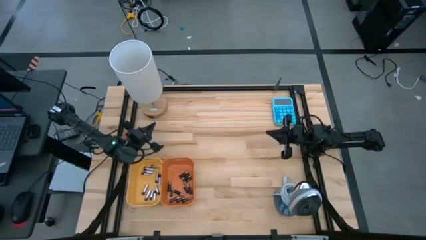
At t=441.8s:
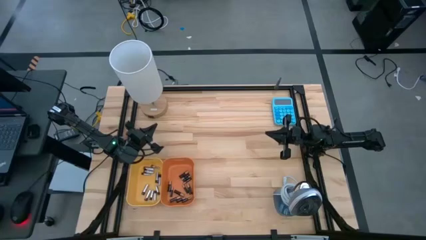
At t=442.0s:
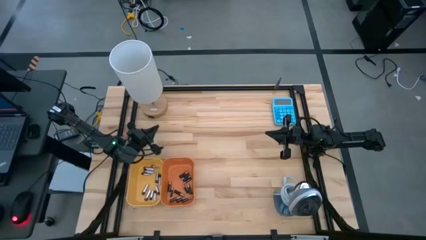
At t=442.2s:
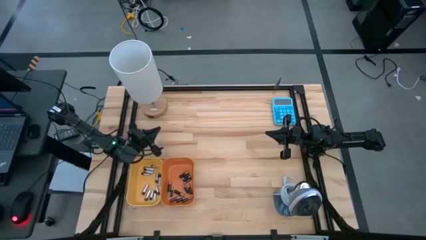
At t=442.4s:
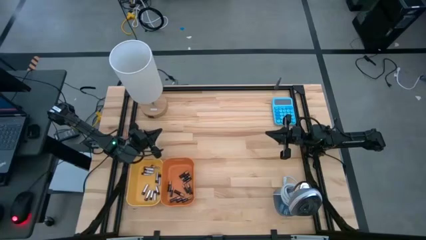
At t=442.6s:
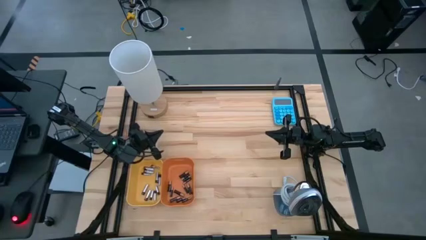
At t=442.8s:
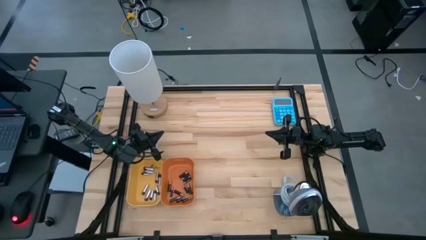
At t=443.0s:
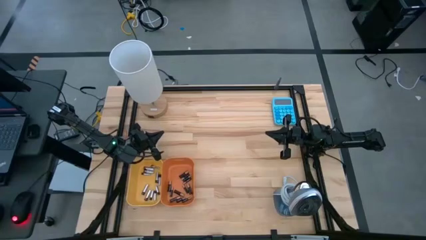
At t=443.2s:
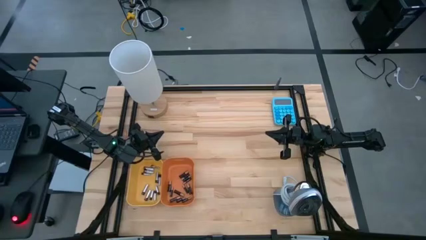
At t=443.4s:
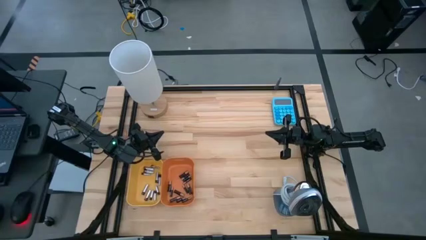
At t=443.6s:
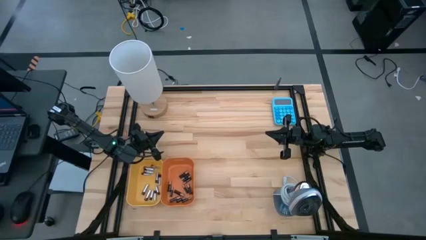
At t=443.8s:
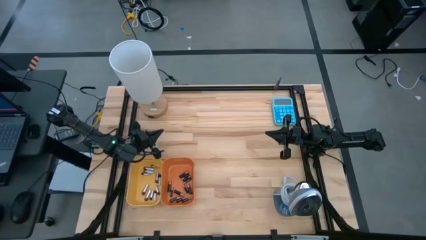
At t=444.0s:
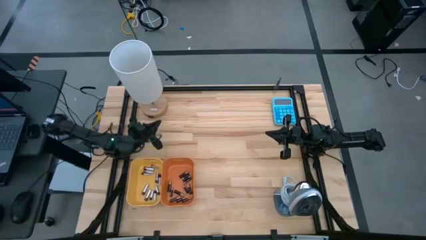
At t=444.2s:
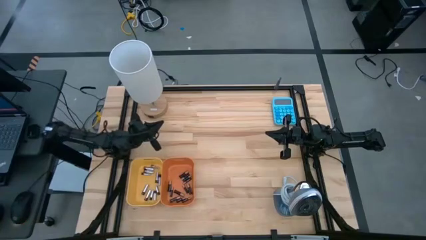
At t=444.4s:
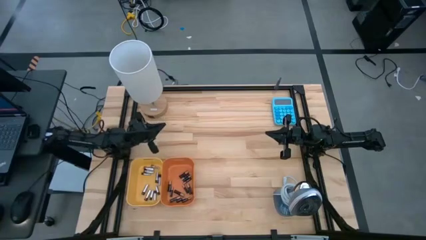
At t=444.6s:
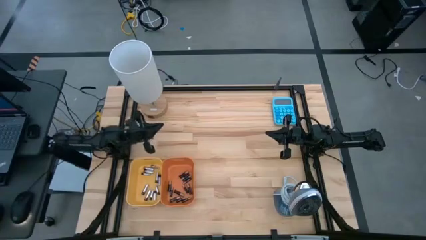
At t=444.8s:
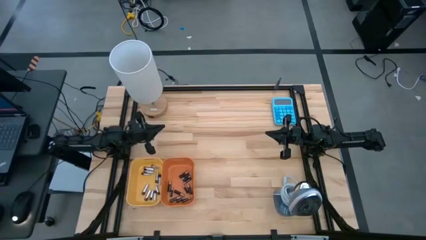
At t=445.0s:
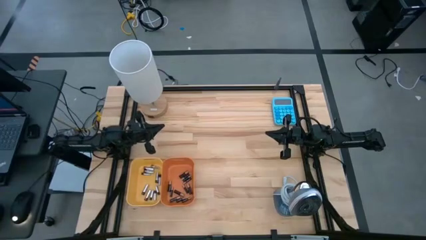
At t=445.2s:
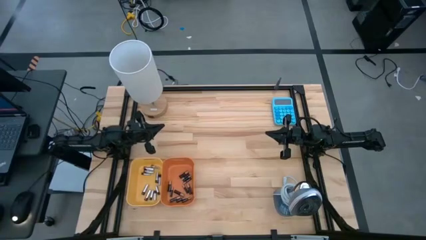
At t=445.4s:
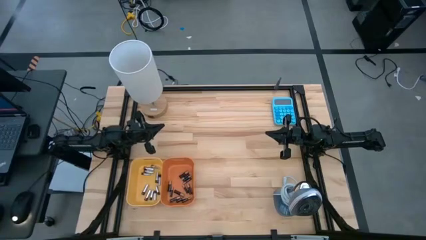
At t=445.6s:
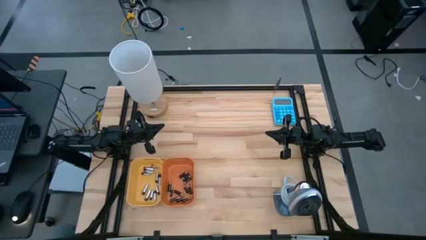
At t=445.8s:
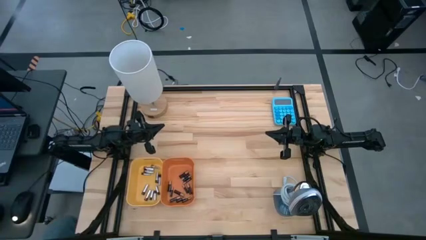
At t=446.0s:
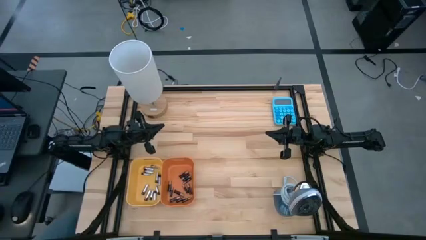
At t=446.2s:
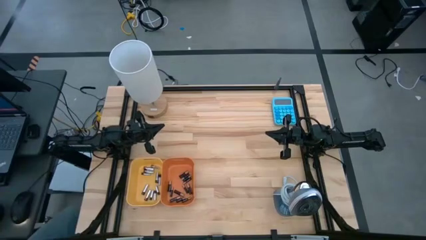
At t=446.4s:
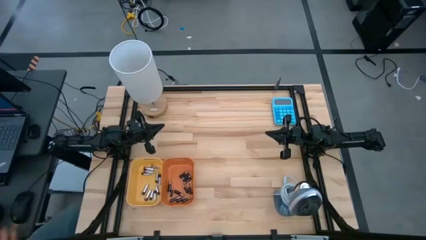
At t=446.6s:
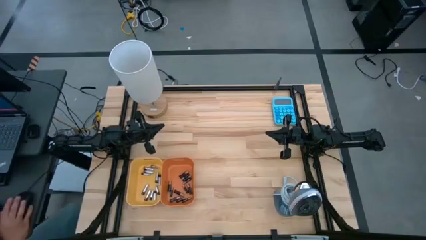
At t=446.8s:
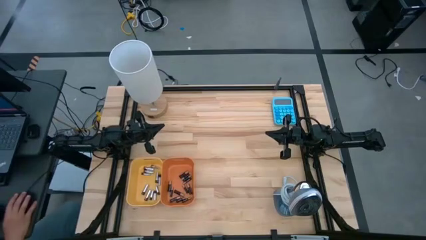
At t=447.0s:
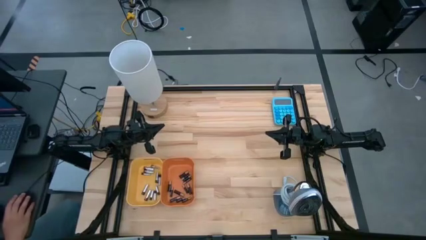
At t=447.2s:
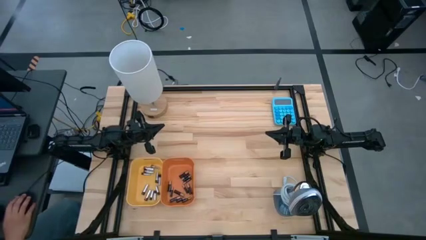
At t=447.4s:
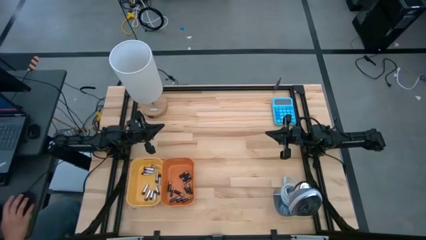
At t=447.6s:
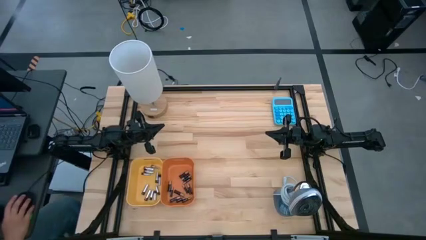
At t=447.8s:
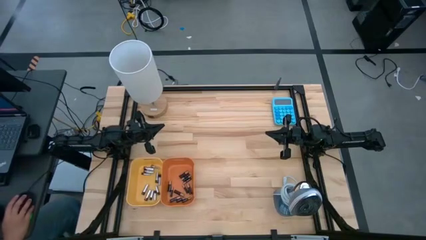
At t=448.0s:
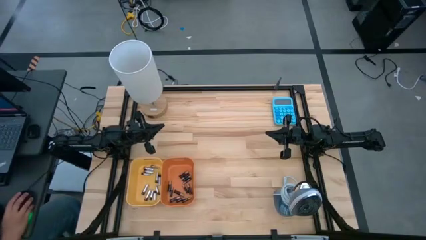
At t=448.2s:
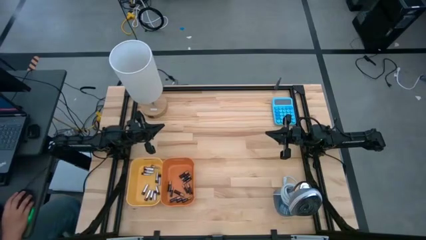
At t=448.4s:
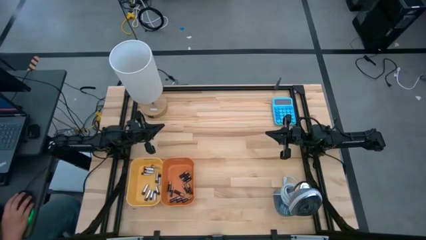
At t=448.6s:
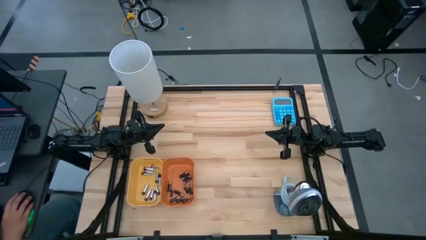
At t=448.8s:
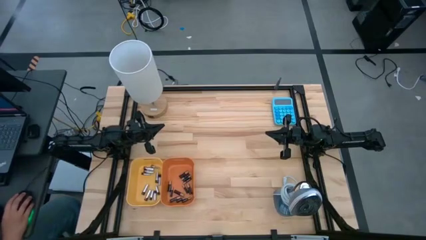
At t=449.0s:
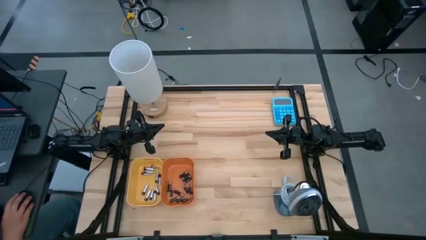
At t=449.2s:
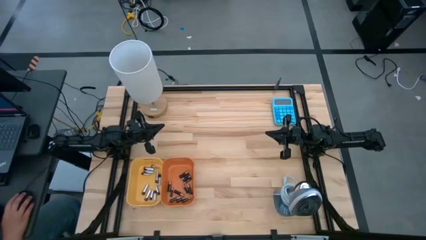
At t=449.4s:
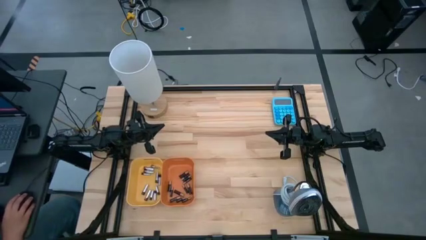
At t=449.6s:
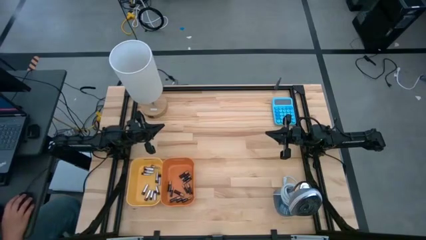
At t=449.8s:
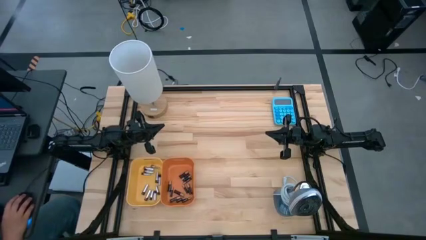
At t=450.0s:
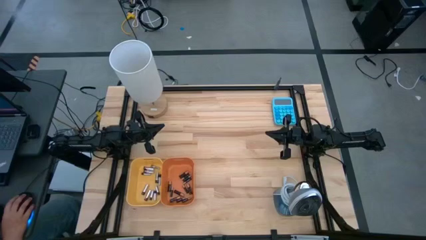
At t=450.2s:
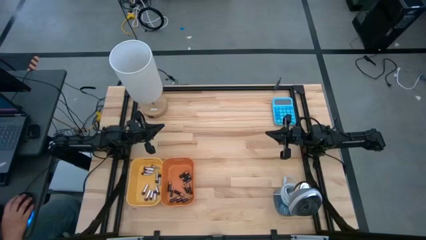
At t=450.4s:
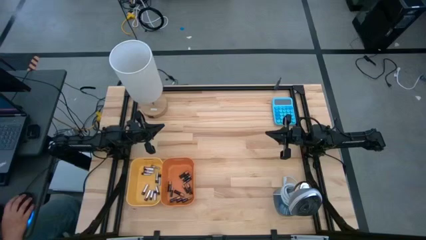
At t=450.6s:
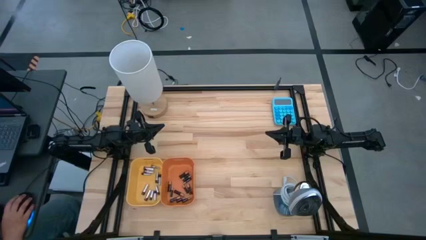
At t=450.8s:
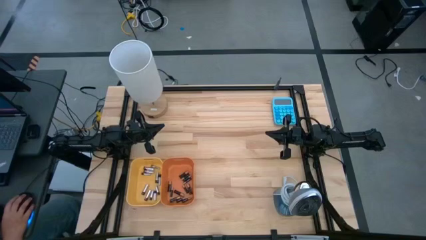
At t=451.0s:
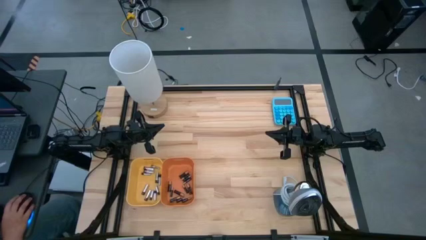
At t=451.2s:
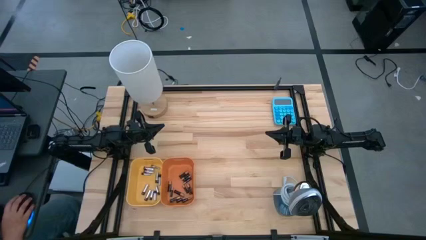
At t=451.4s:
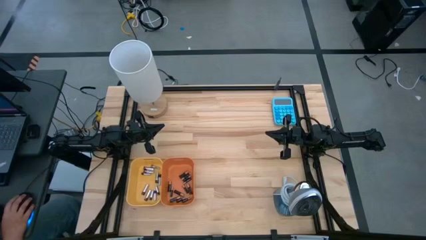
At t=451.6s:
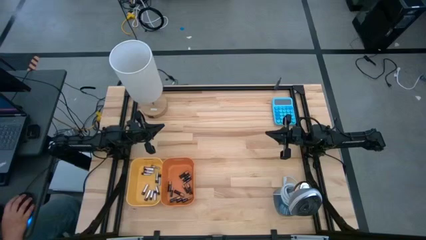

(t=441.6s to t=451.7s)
Task: Sort batteries
Return to Home Position
